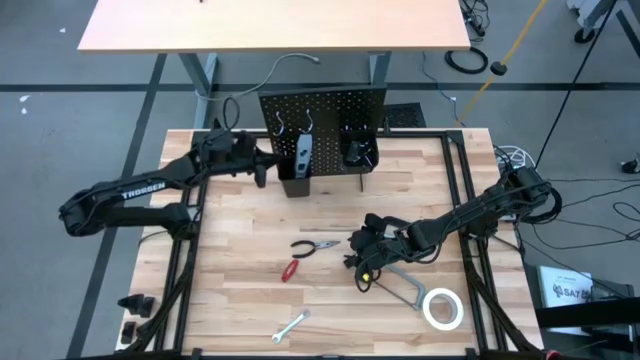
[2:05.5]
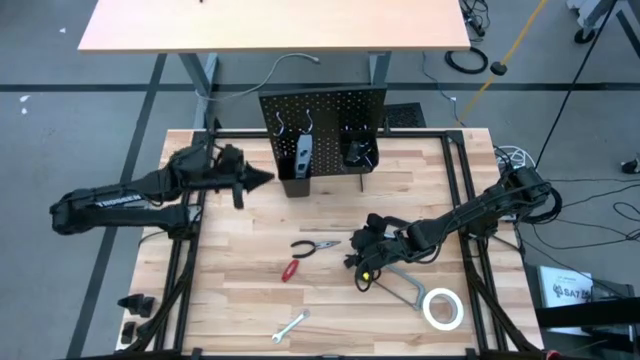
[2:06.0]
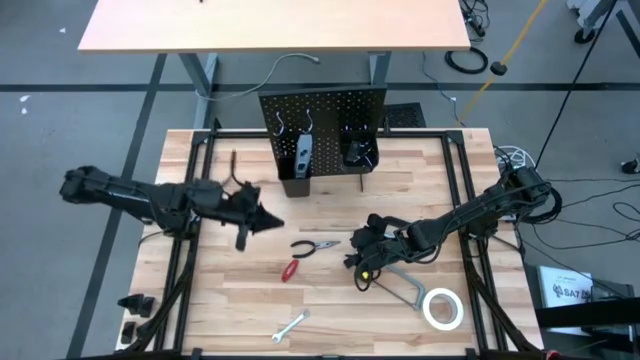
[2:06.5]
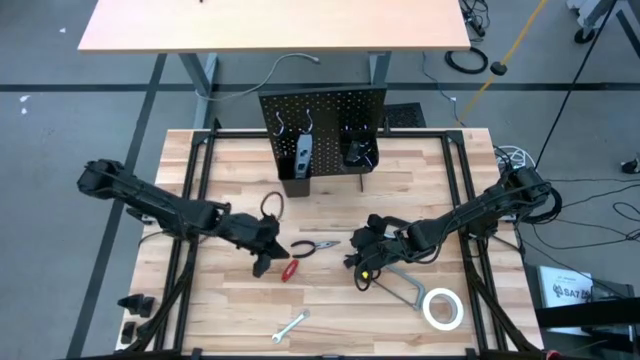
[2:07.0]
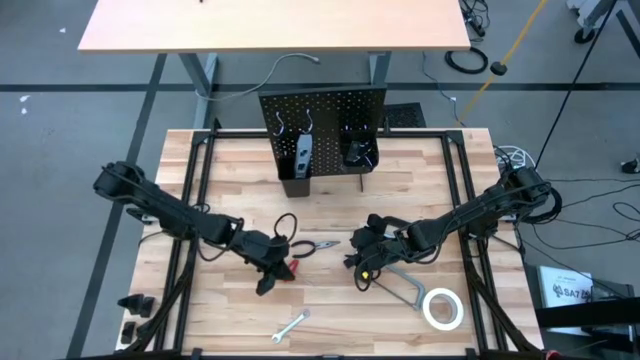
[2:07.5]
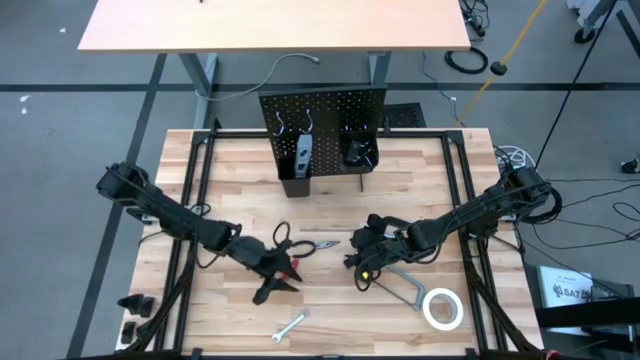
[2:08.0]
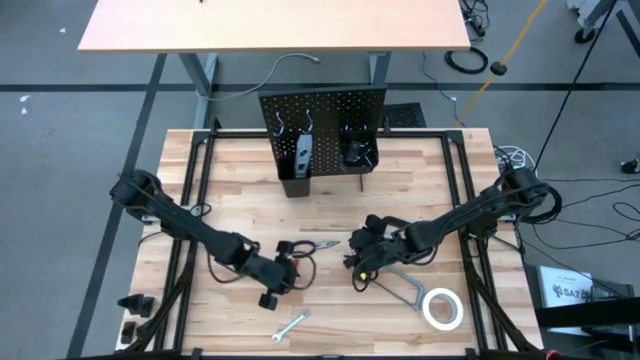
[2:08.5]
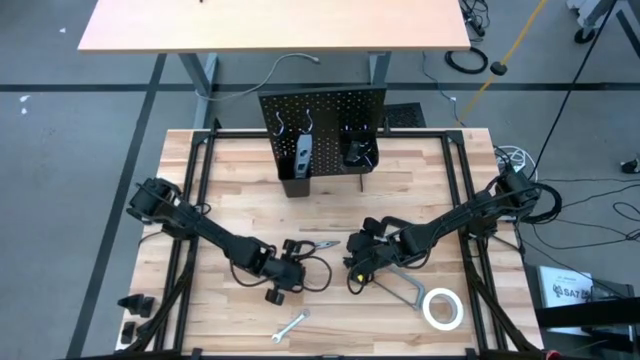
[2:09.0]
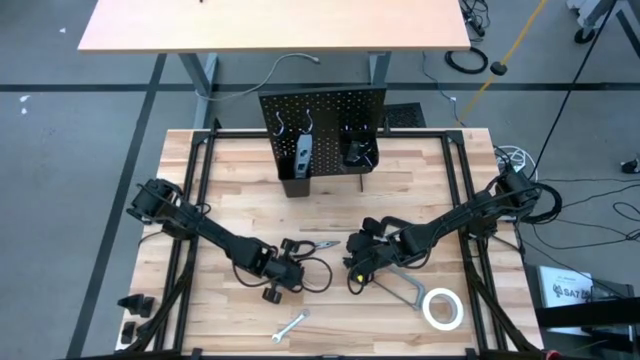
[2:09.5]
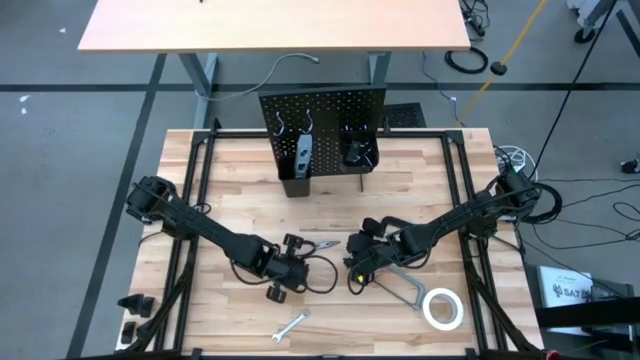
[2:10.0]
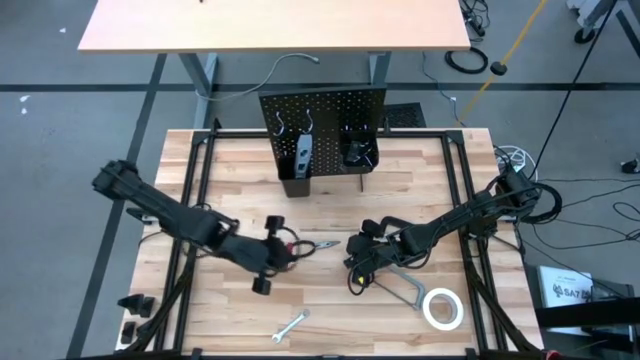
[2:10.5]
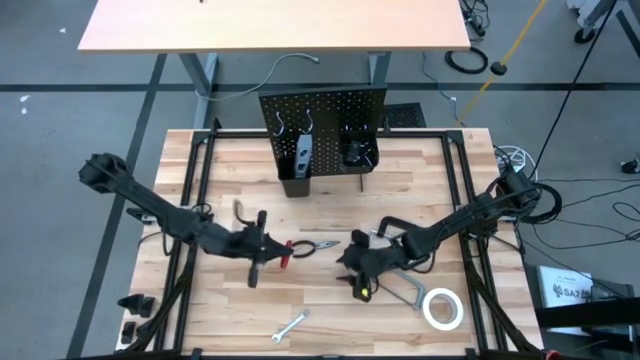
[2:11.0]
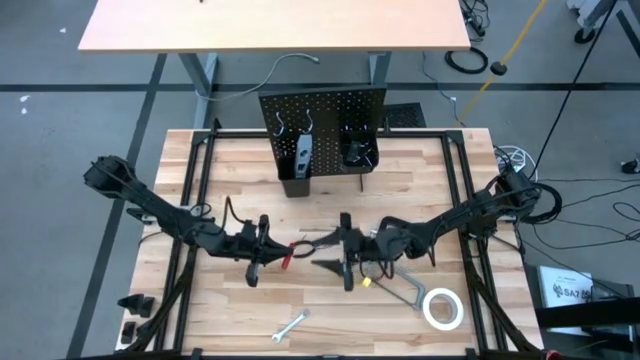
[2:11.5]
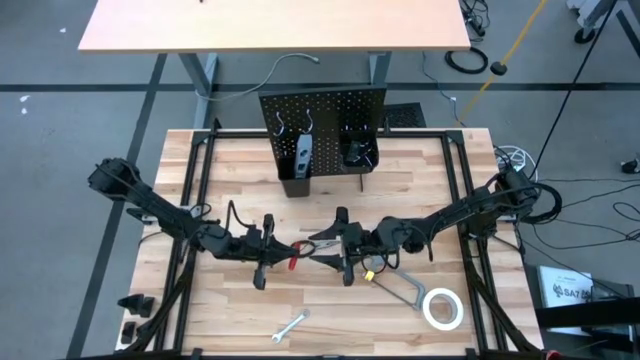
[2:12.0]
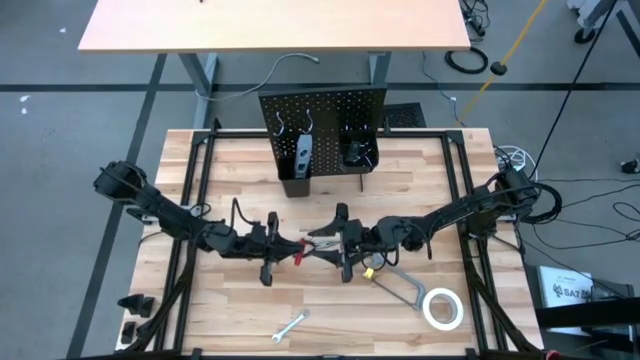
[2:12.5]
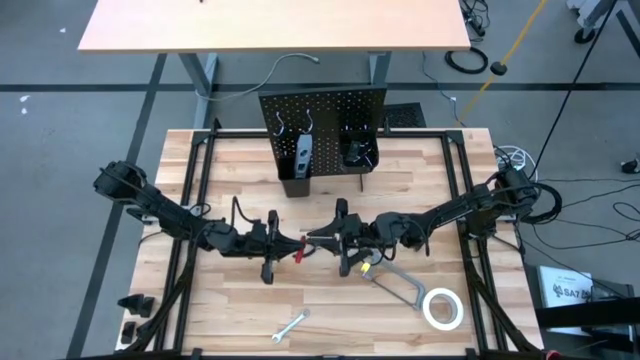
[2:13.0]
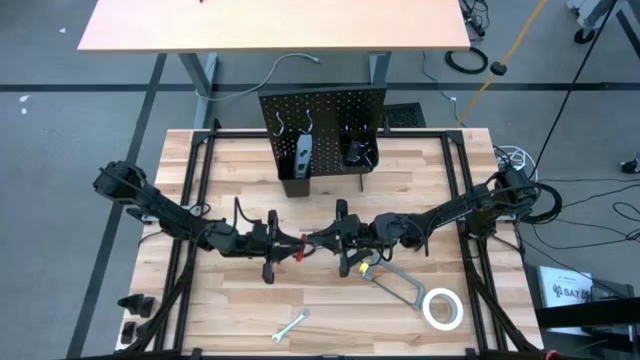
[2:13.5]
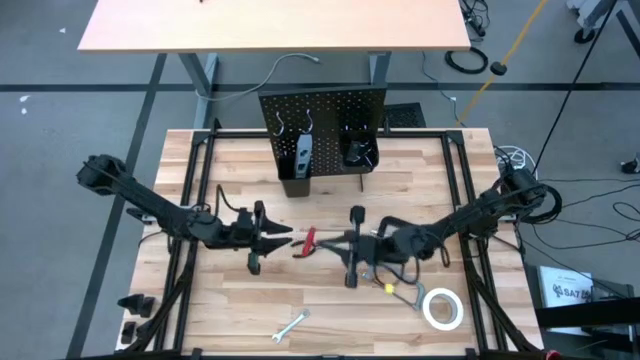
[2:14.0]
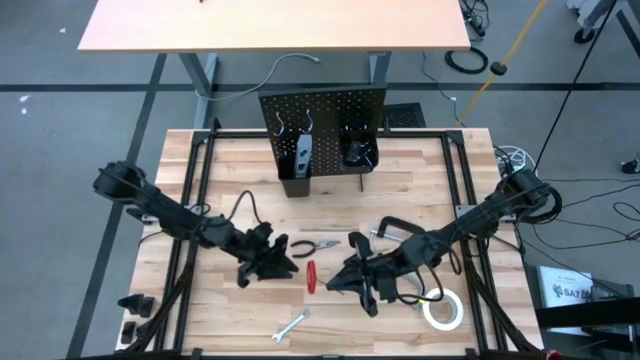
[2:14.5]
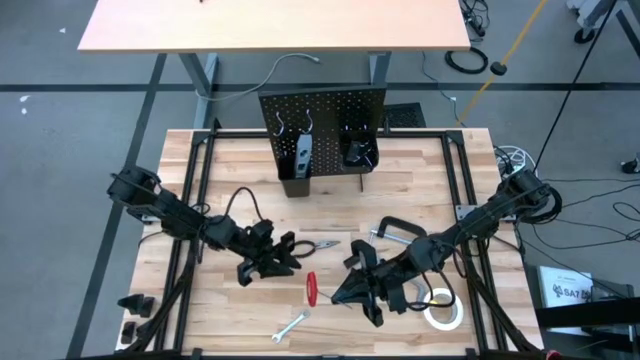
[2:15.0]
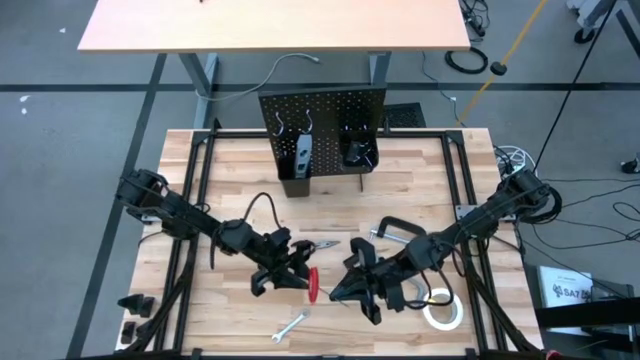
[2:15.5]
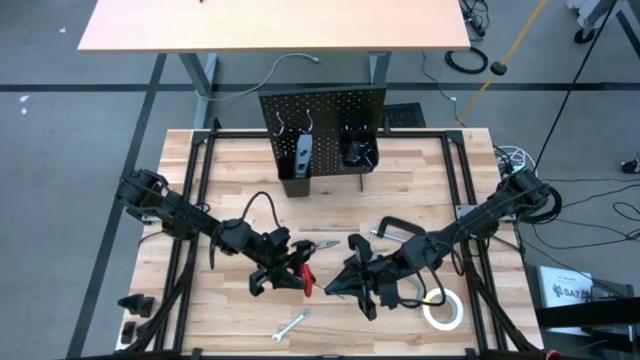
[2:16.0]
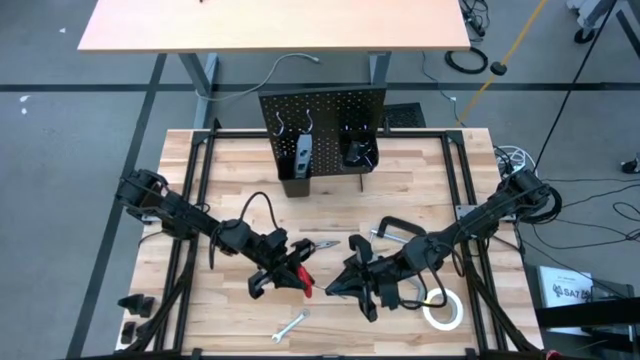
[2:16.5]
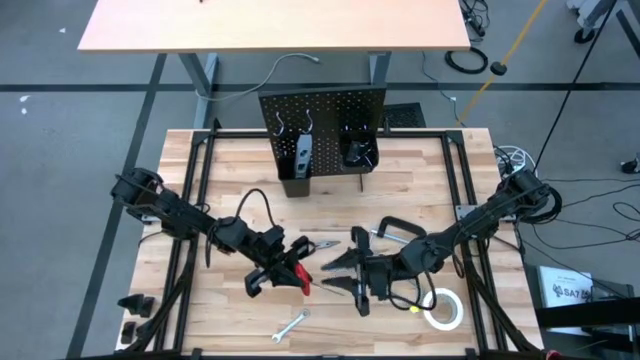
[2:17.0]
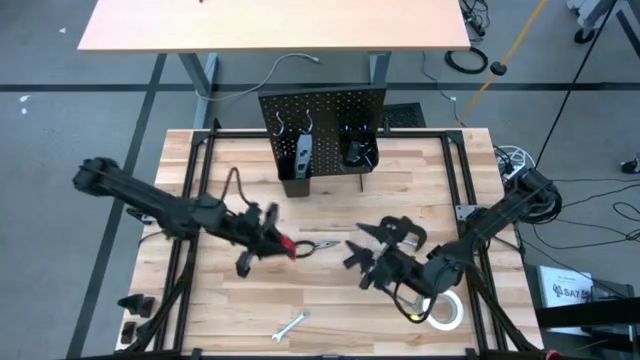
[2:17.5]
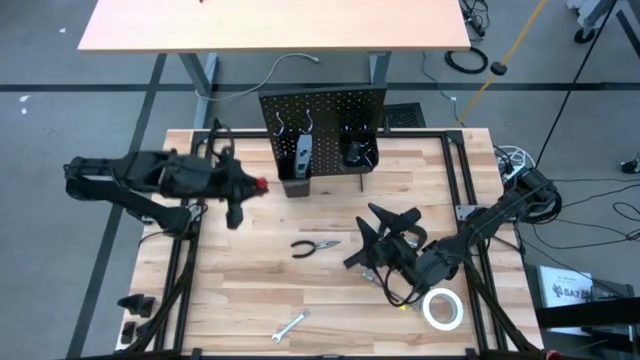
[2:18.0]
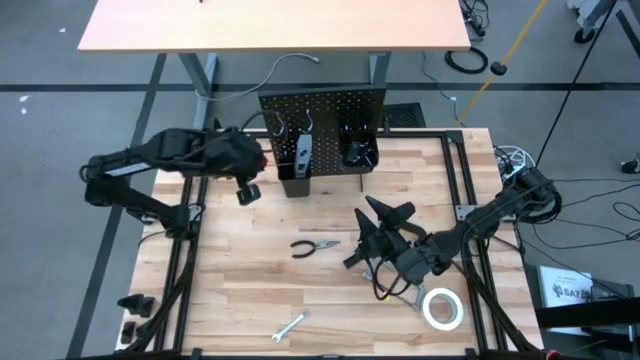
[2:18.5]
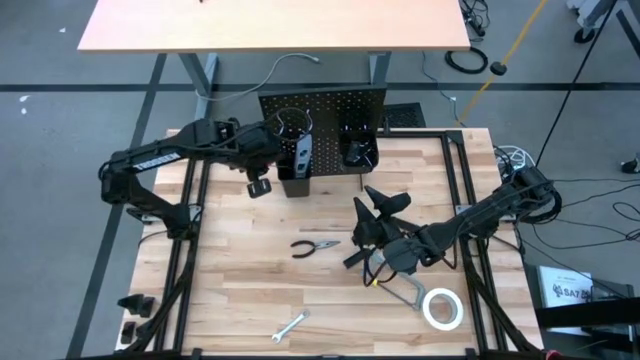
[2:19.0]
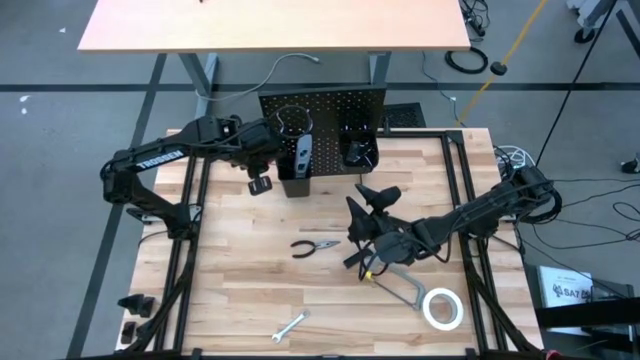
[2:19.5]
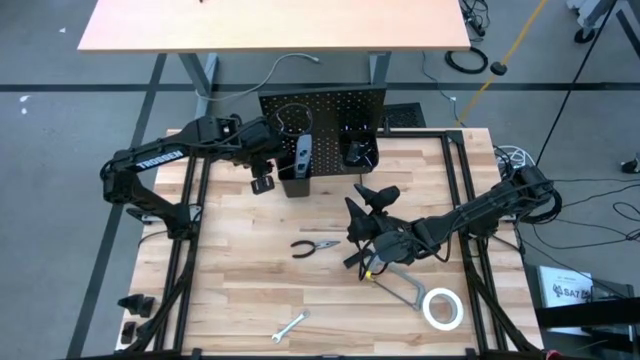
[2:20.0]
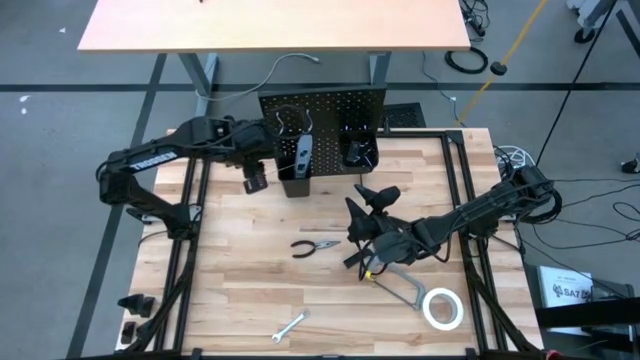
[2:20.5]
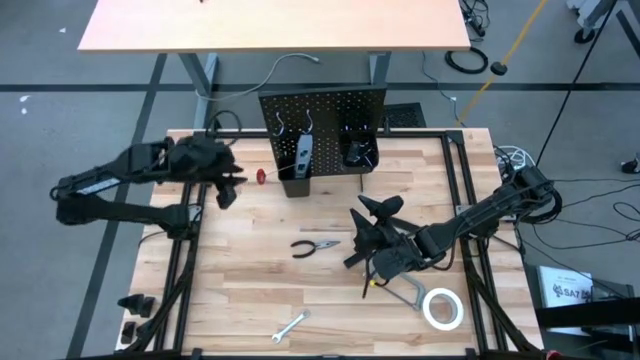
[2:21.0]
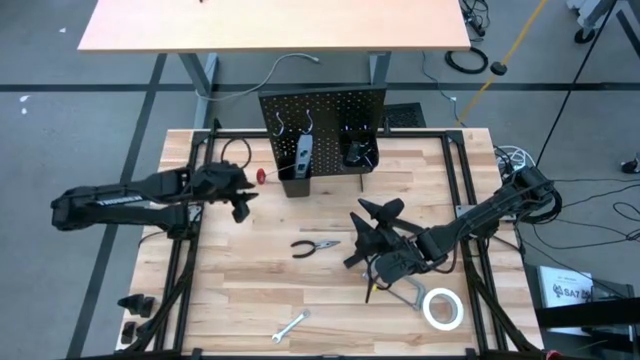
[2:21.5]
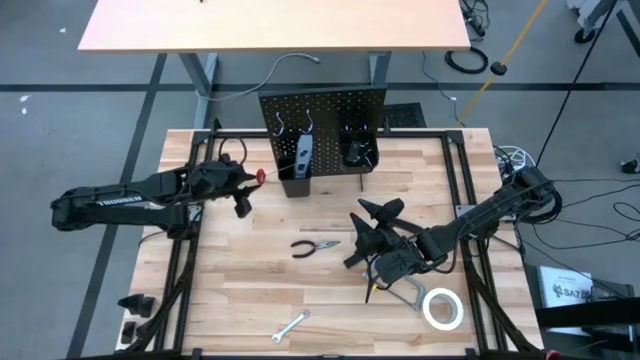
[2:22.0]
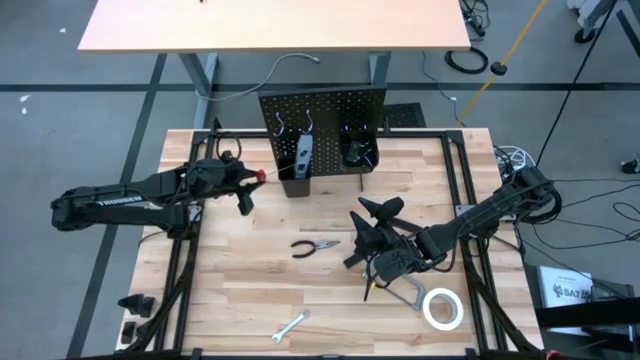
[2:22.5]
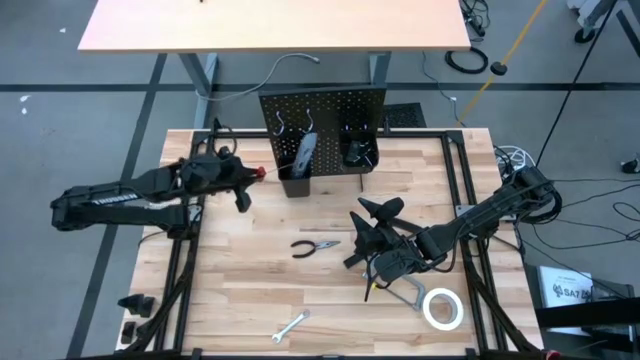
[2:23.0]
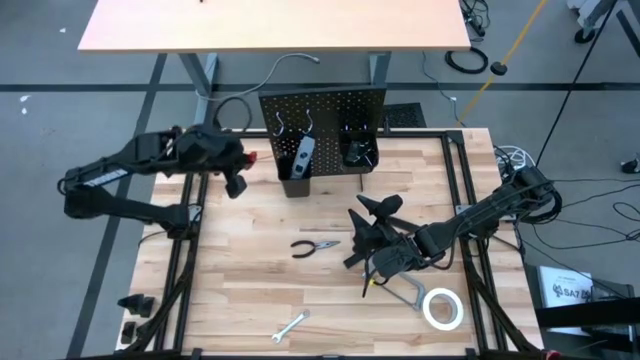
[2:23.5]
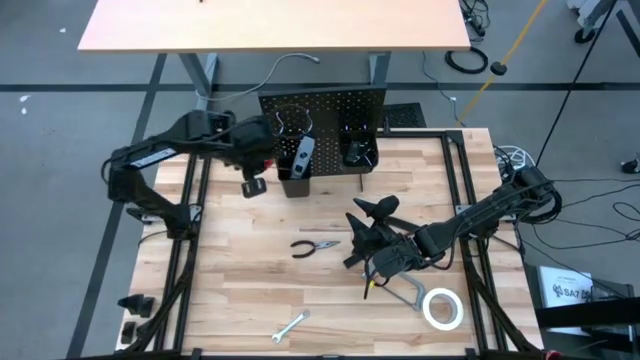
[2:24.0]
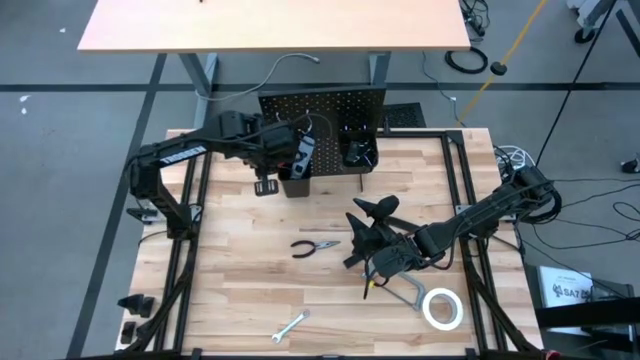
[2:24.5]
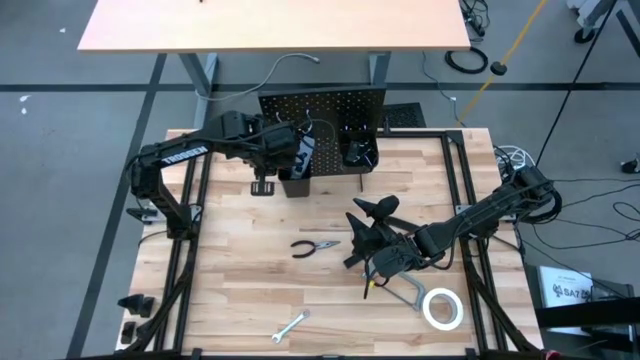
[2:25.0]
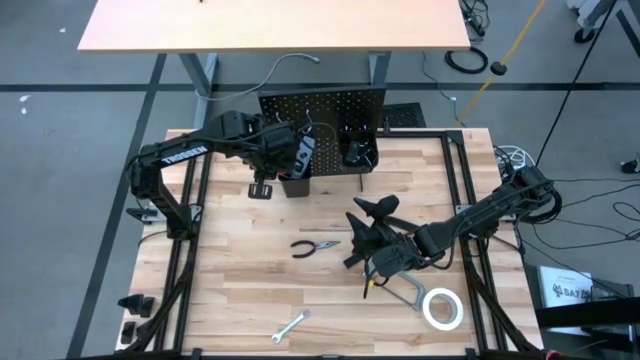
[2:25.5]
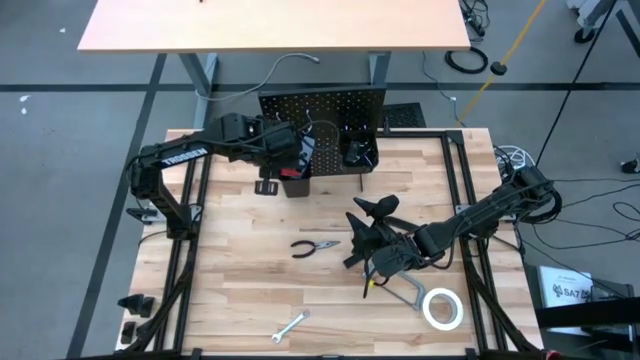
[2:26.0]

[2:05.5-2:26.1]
Task: Hang tools onto peg board
Put the allen wrench into the left black bin on the pegboard
